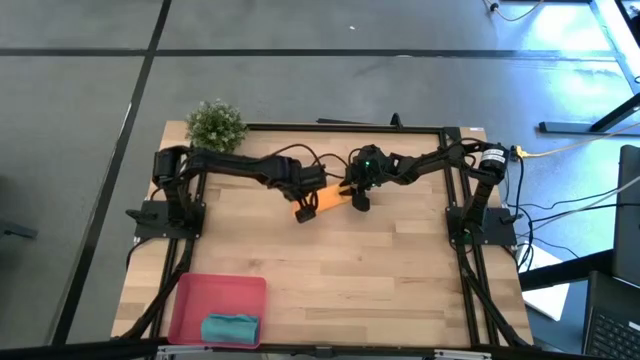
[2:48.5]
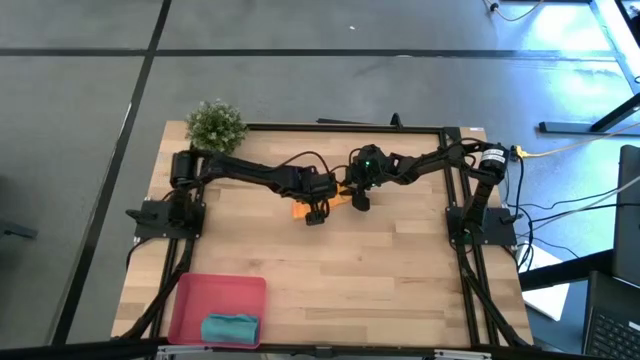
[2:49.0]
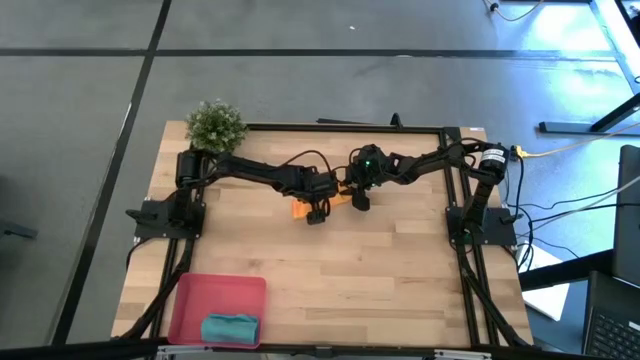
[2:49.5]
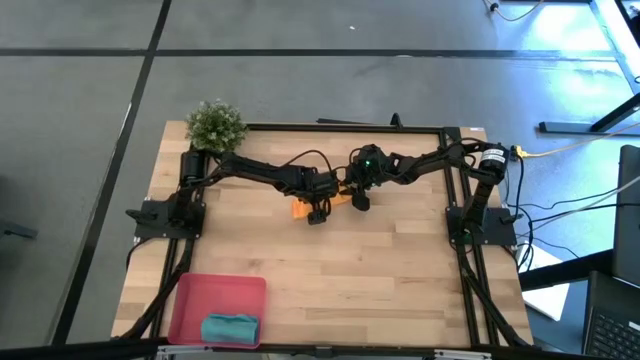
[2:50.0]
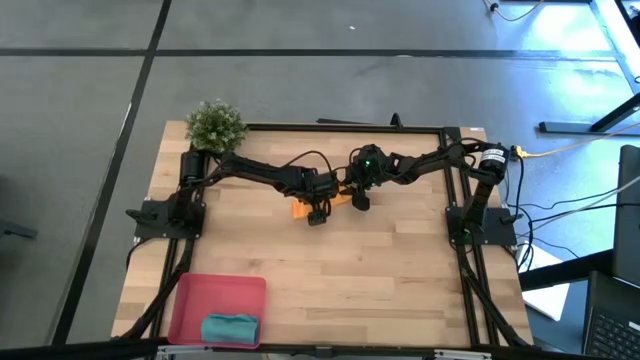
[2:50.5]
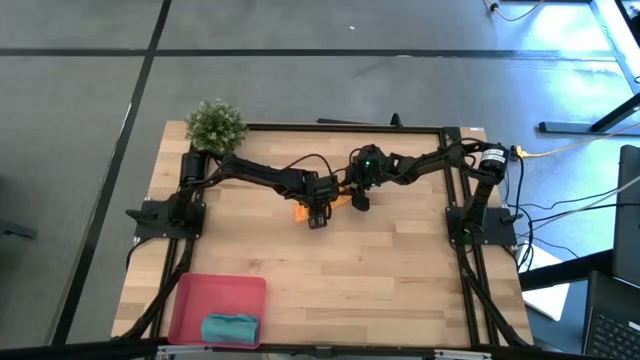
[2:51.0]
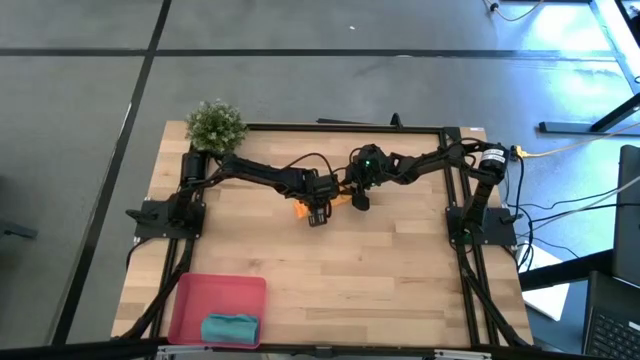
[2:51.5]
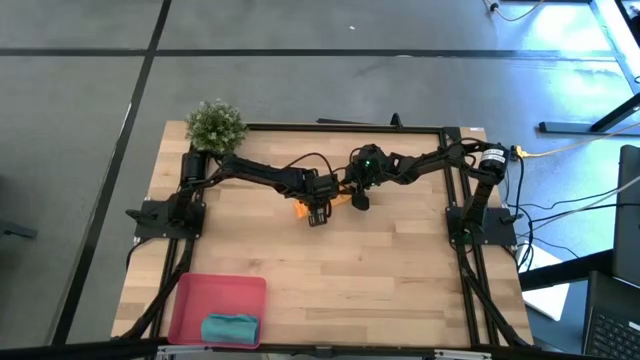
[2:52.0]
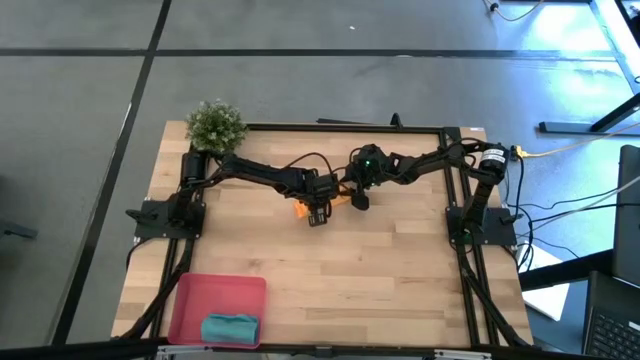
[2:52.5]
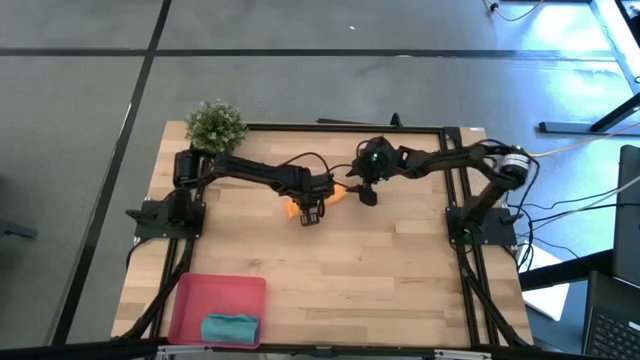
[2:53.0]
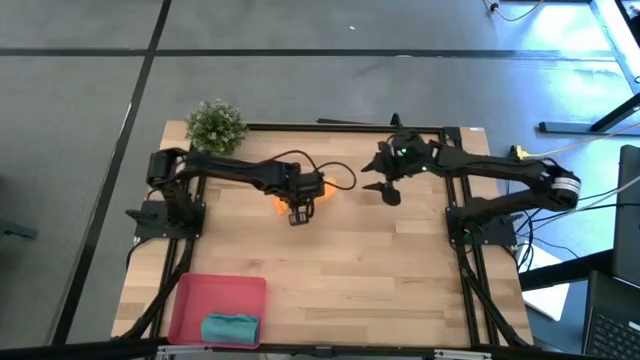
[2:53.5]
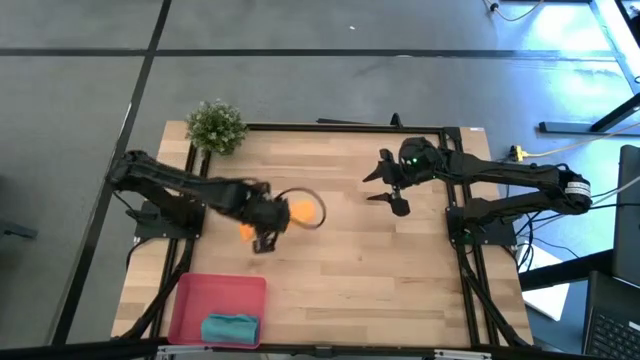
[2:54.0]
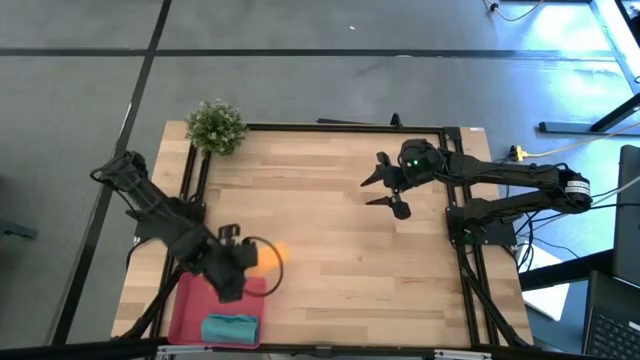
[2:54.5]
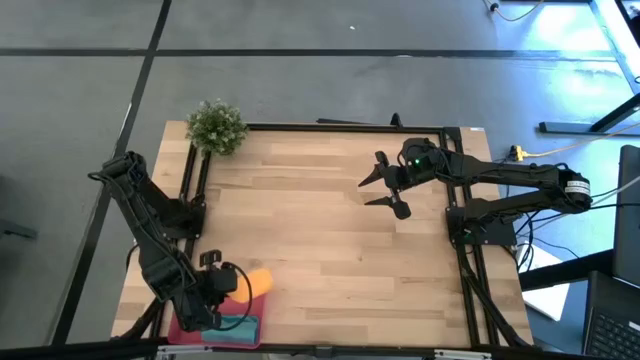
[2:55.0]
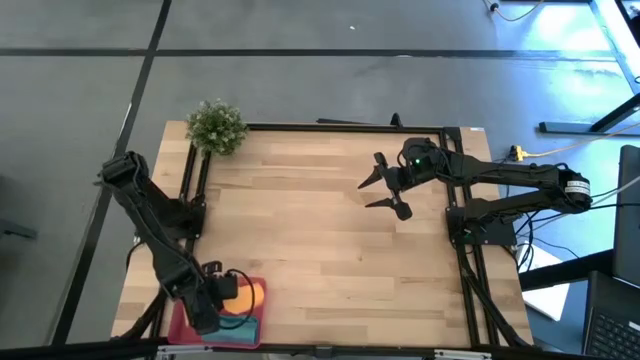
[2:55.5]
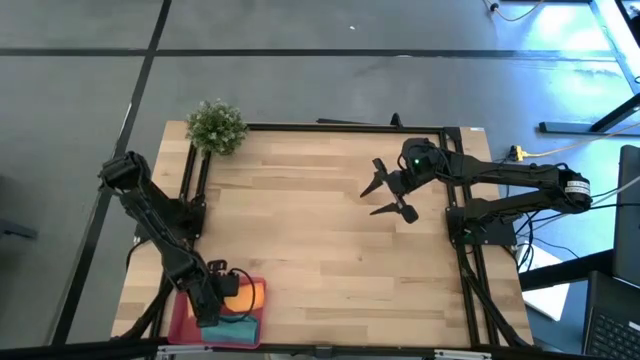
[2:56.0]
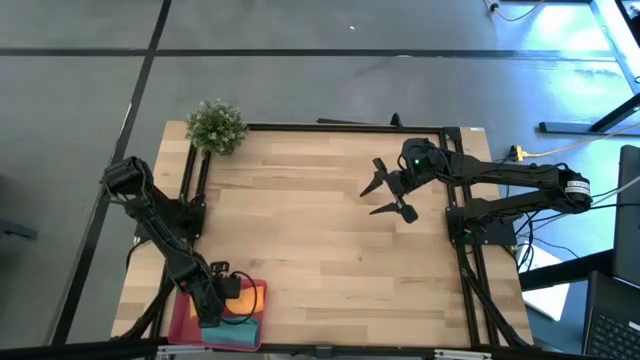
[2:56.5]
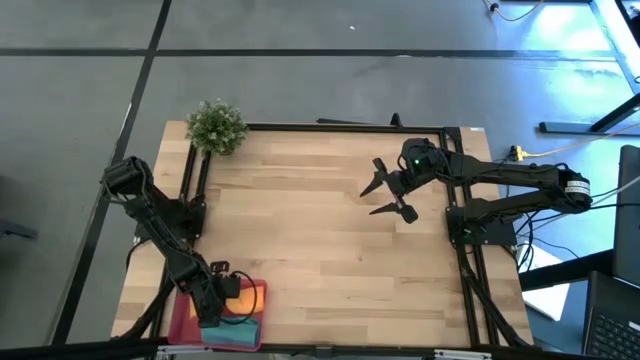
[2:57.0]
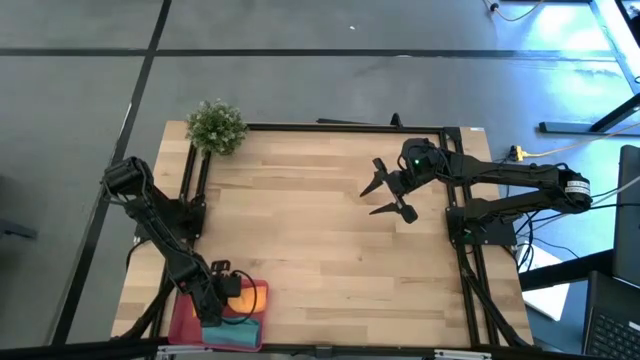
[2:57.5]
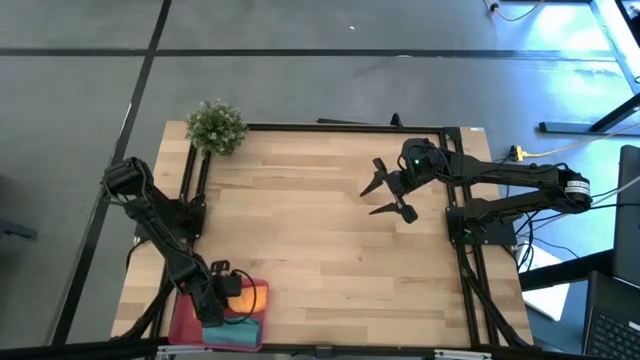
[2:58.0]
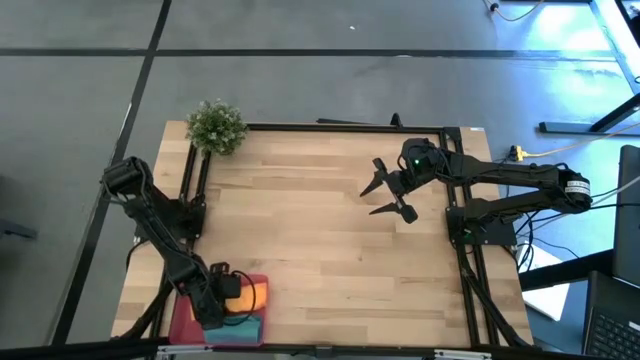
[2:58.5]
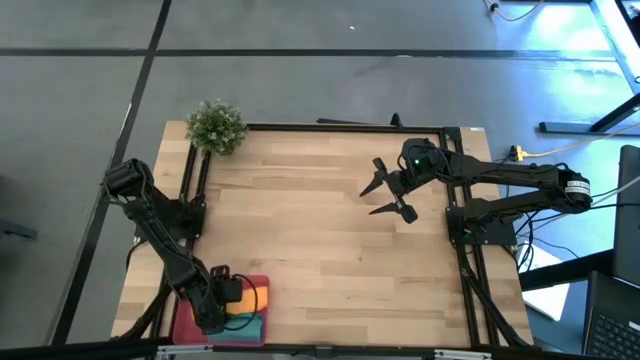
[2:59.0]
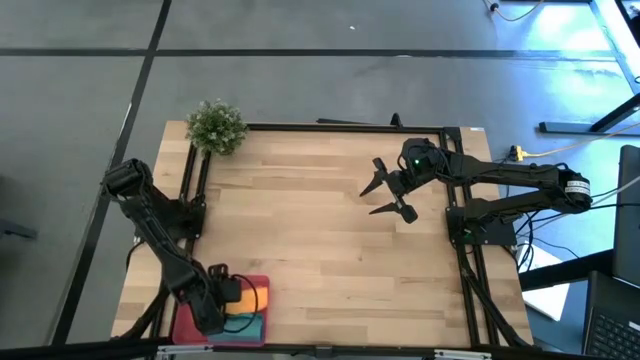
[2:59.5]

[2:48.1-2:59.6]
Task: Roll microfiber towels into tight, uniform cylinder then place into a basket
Put the orange microfiber towel into the red bin

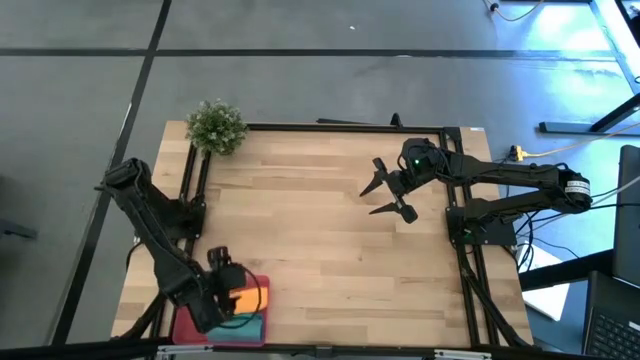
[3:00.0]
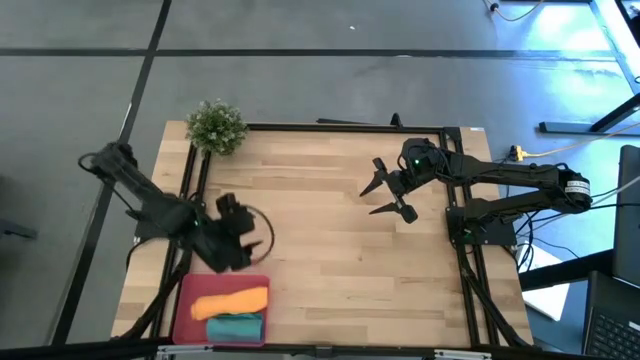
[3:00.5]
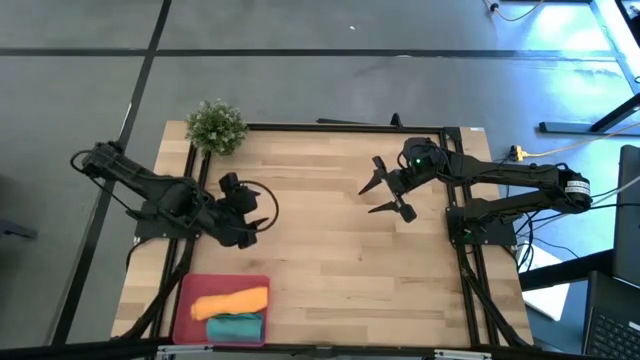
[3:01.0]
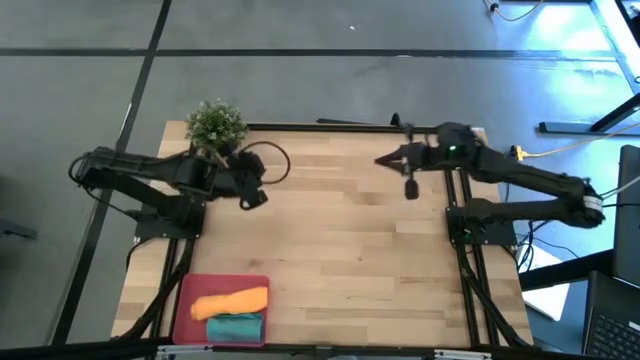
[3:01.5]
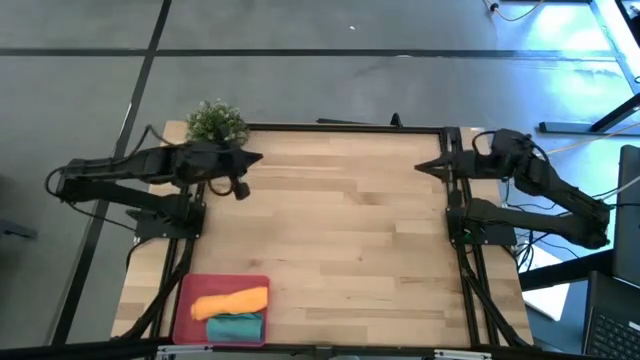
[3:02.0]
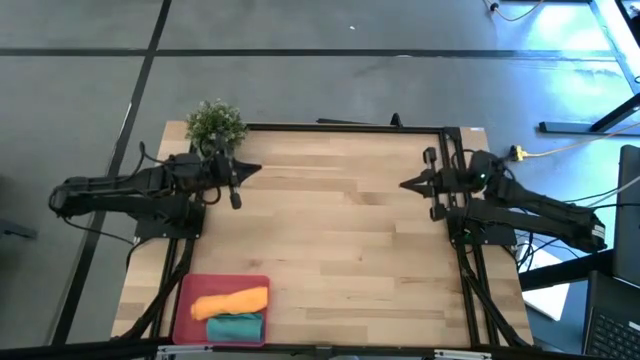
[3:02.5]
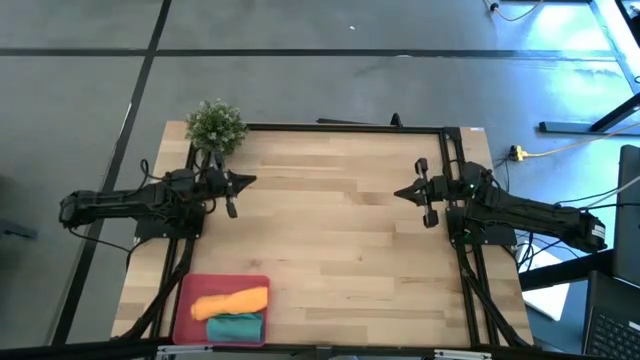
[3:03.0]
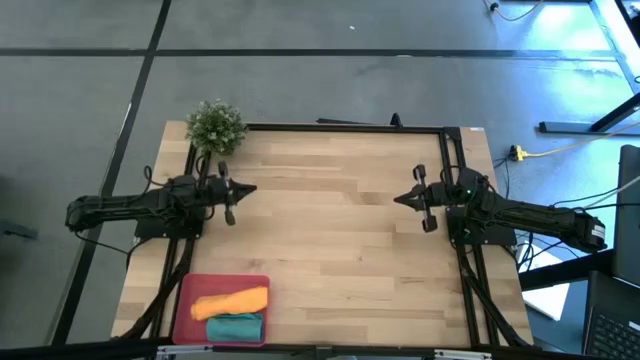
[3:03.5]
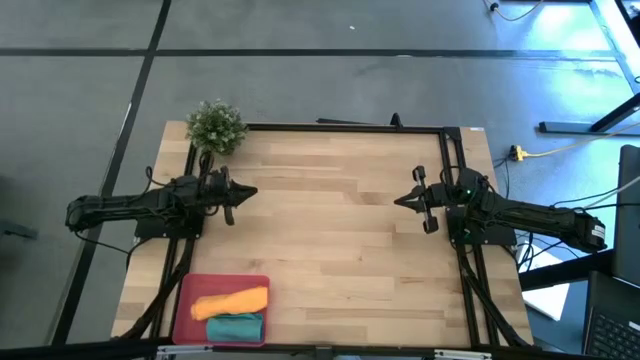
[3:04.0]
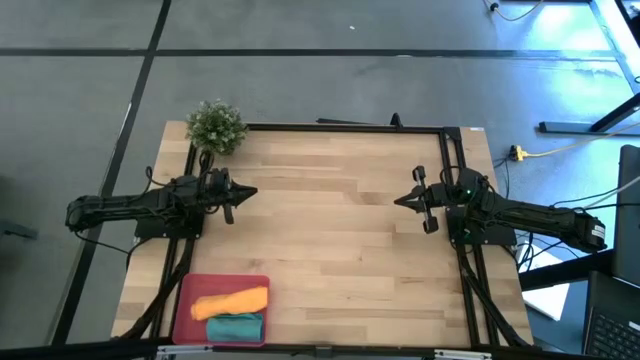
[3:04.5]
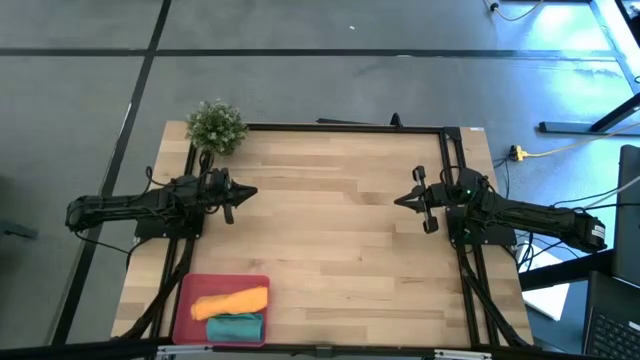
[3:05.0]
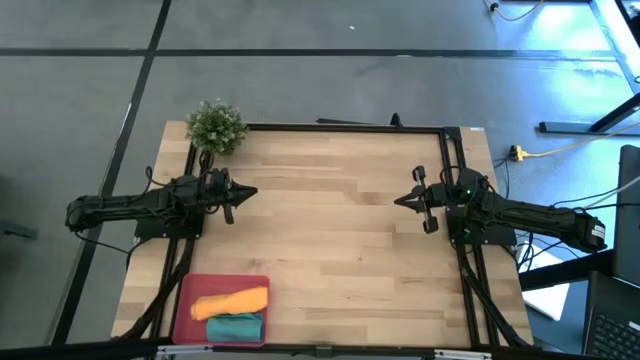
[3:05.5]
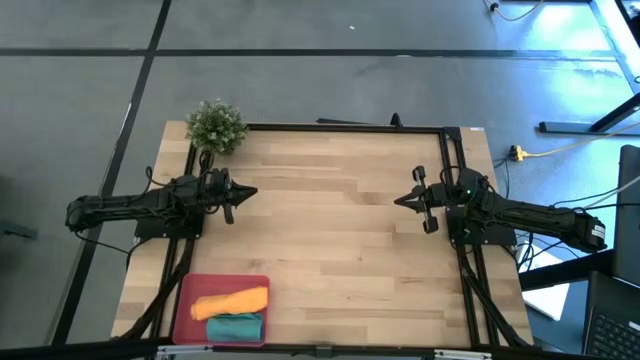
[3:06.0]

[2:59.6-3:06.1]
Return to Home Position

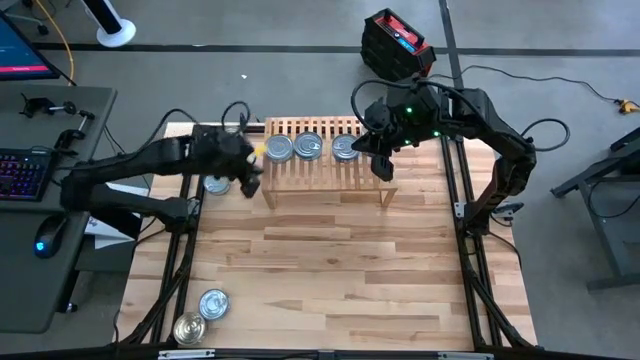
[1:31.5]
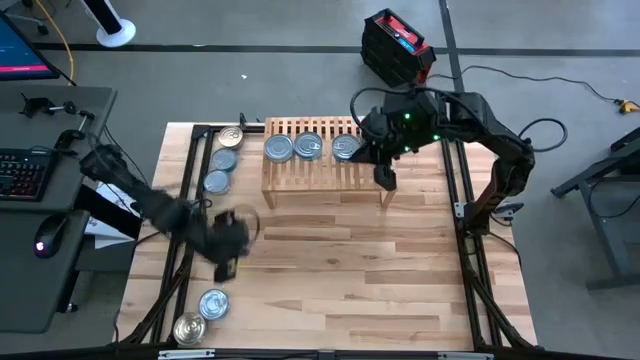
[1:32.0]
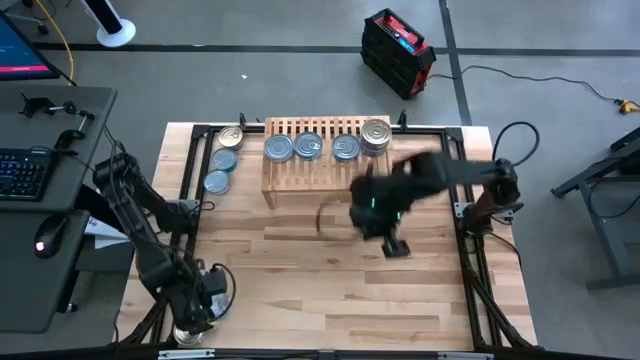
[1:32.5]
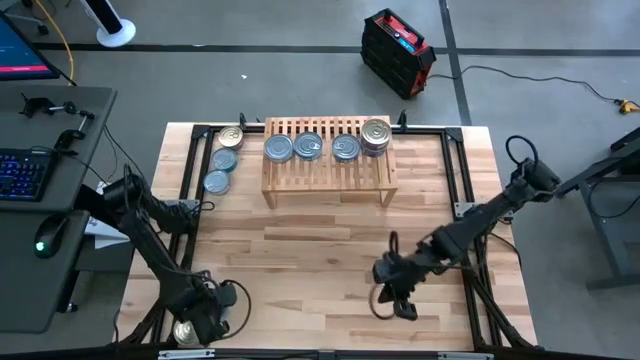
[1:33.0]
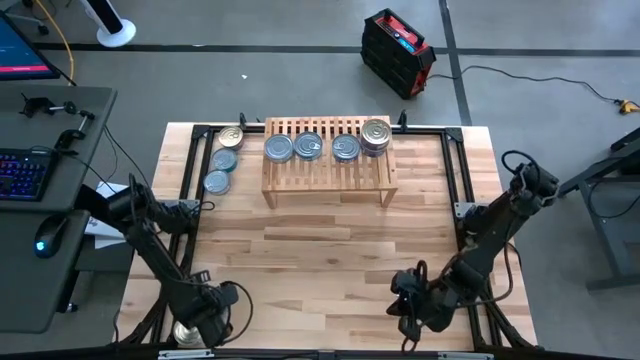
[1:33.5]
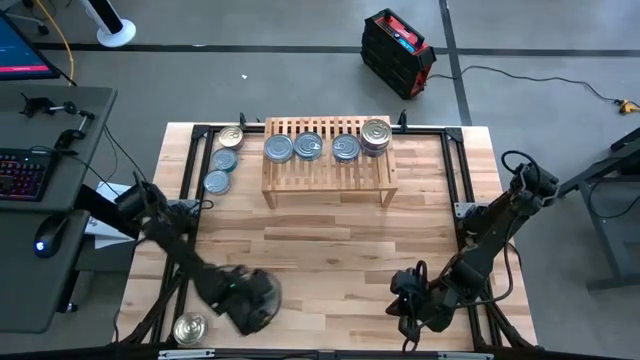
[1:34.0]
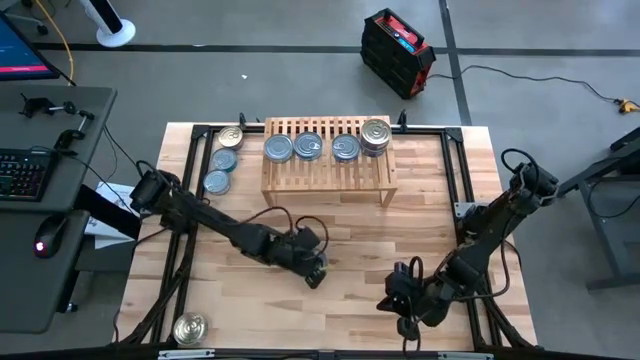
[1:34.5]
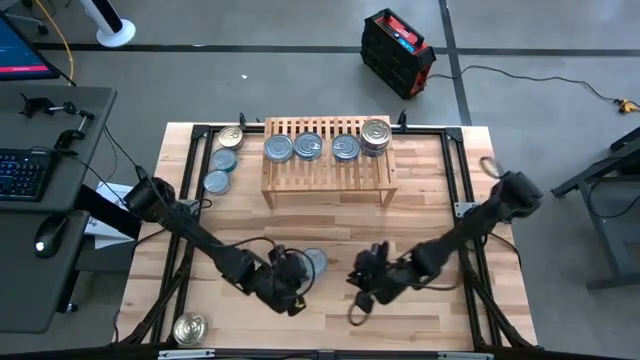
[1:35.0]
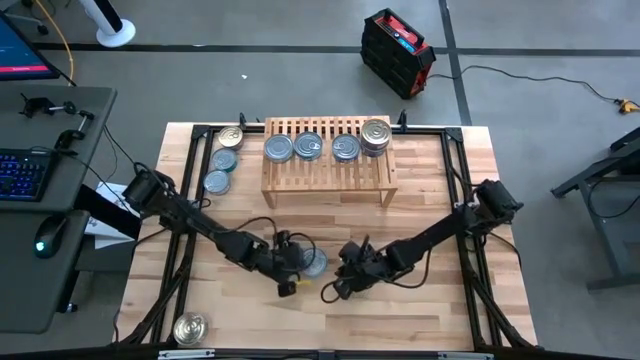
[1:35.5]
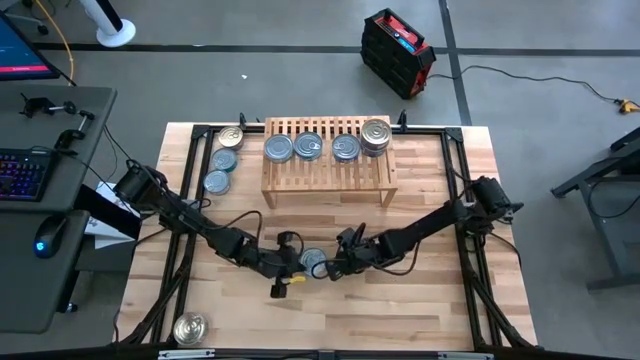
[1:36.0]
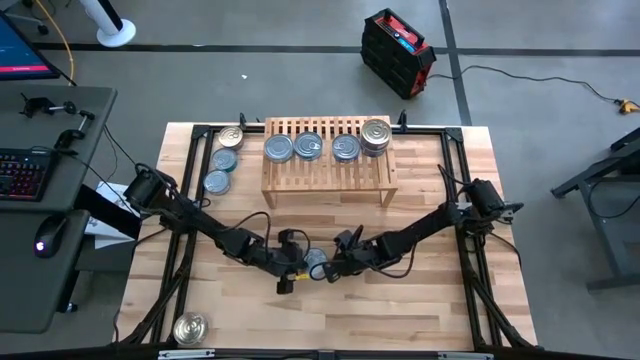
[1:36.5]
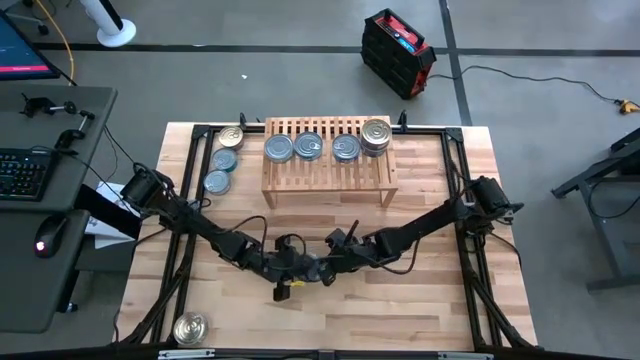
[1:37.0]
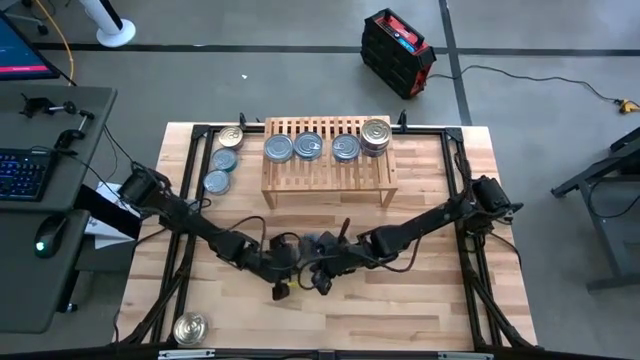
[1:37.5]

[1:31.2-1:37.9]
Task: Stack canned seafood by type on shelf
Stack the blue tuna can on the blue tuna can on the shelf
